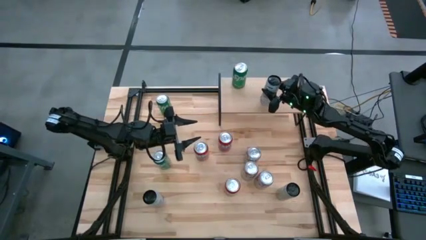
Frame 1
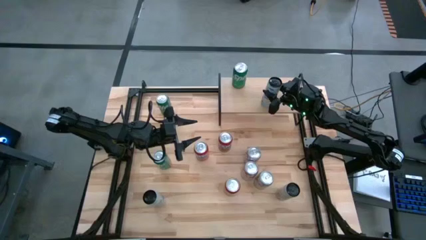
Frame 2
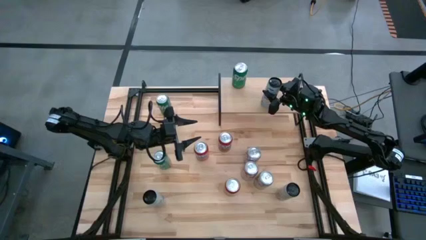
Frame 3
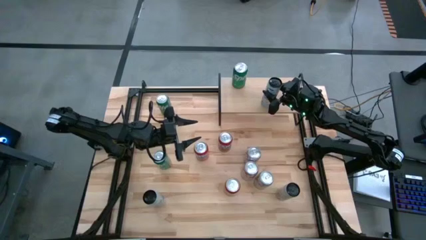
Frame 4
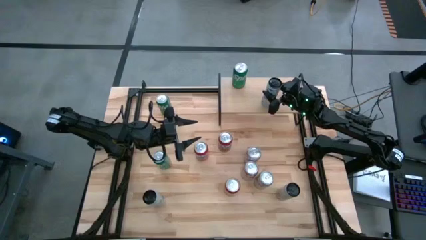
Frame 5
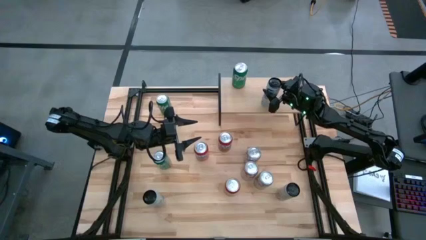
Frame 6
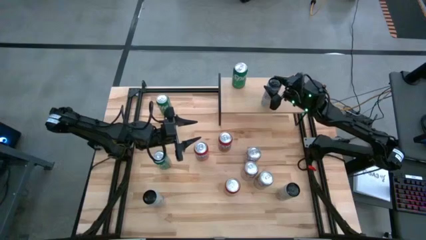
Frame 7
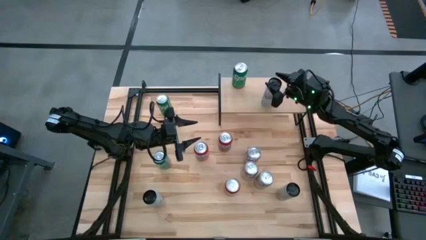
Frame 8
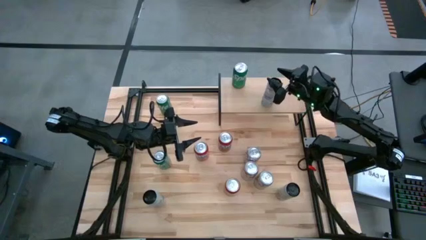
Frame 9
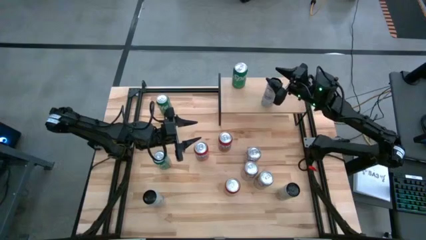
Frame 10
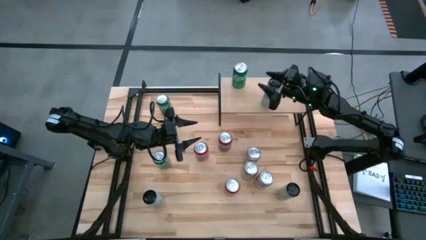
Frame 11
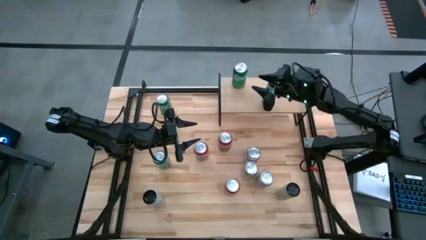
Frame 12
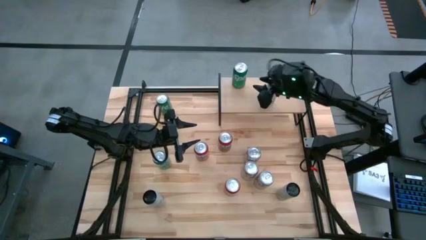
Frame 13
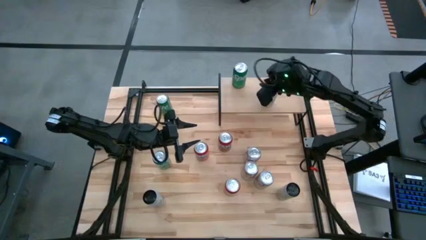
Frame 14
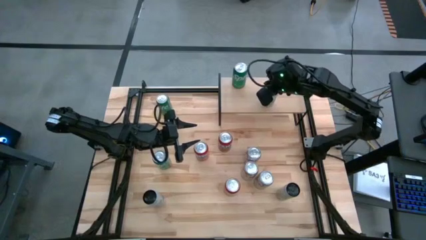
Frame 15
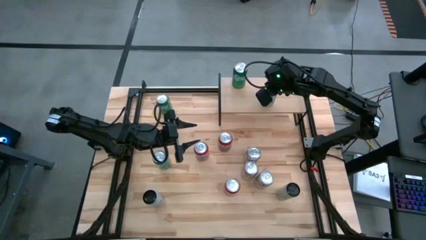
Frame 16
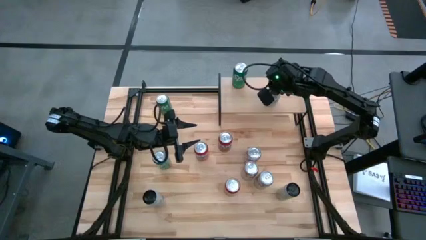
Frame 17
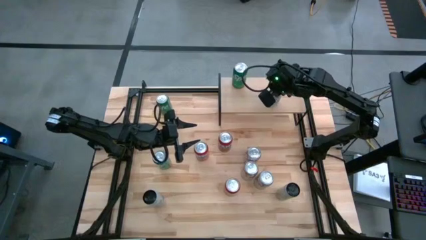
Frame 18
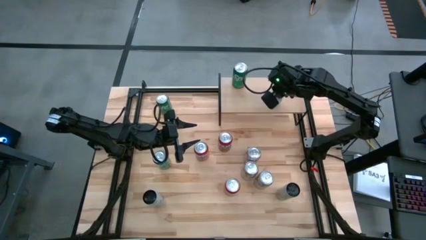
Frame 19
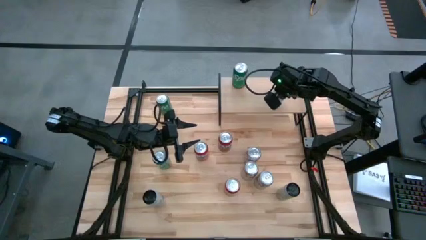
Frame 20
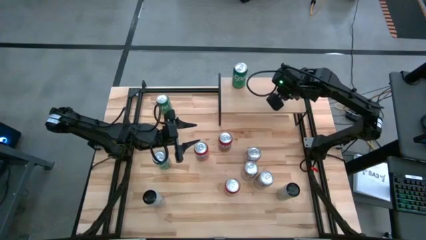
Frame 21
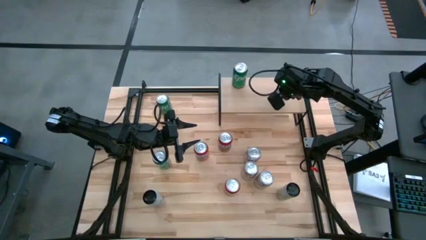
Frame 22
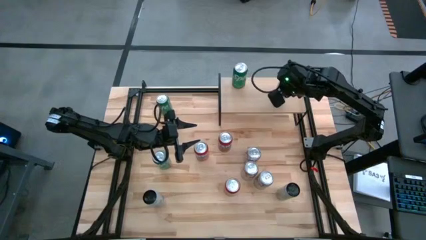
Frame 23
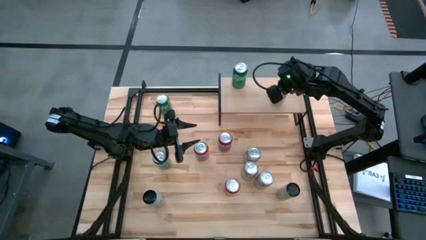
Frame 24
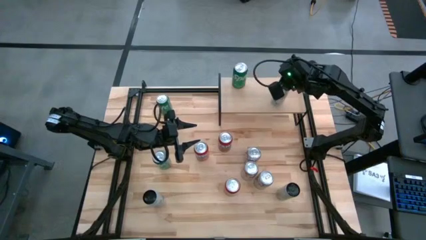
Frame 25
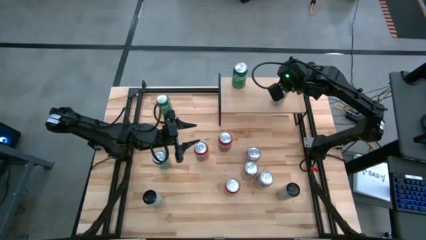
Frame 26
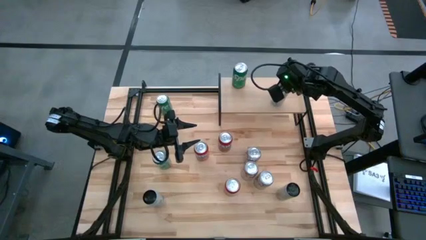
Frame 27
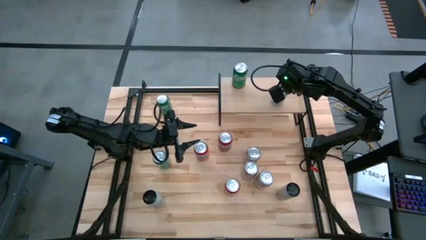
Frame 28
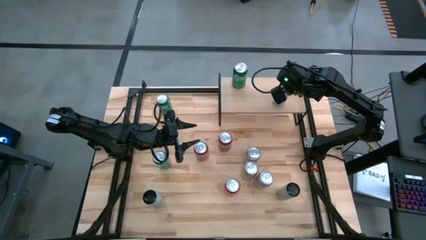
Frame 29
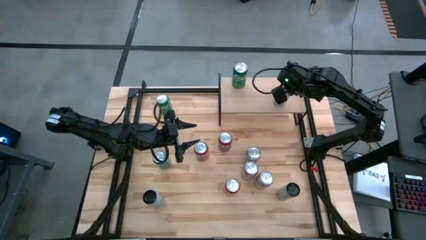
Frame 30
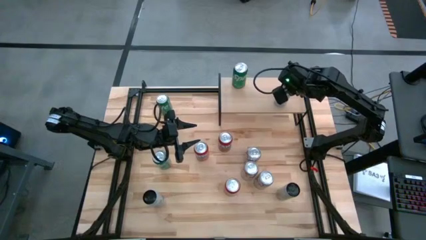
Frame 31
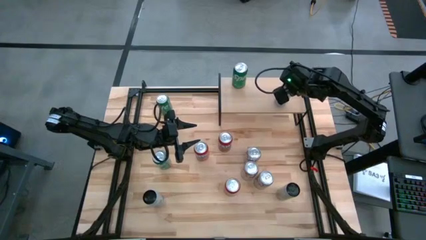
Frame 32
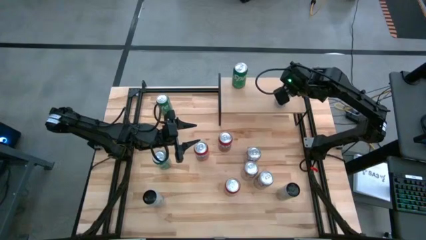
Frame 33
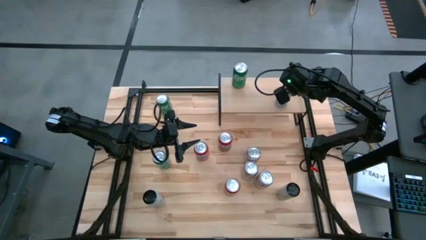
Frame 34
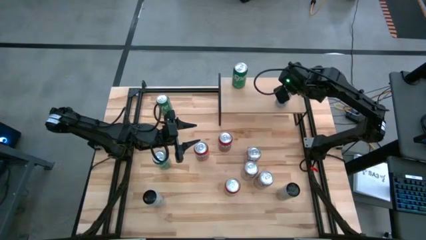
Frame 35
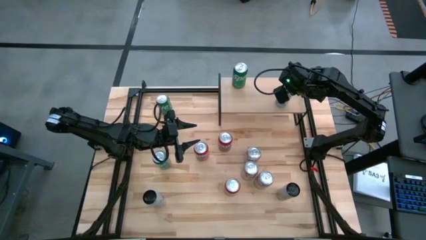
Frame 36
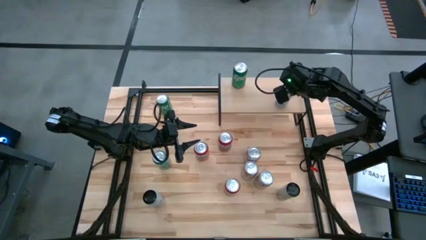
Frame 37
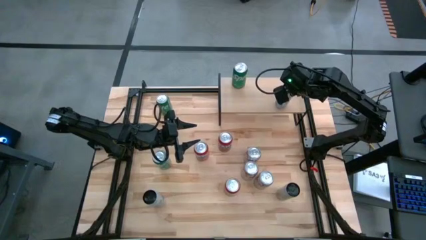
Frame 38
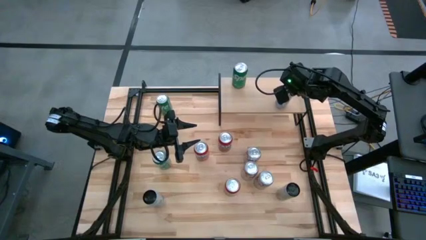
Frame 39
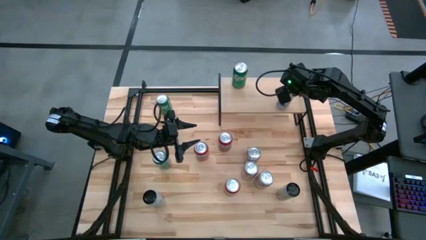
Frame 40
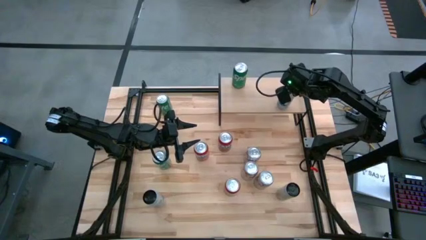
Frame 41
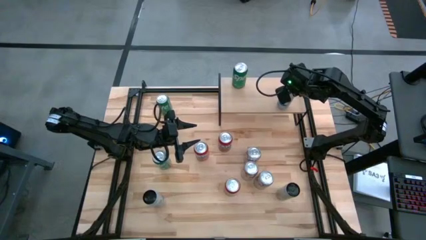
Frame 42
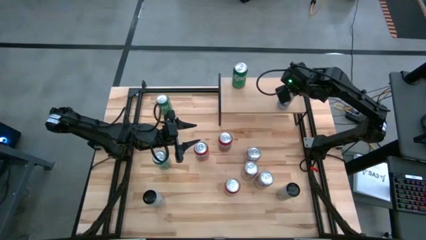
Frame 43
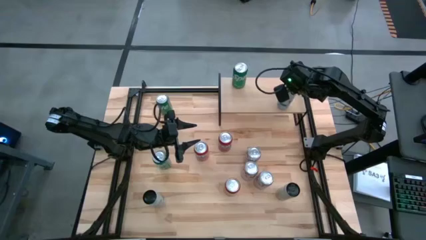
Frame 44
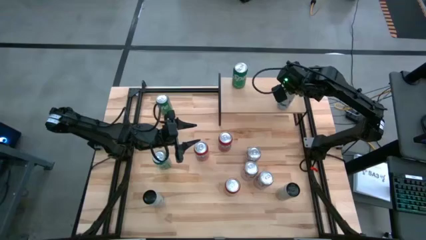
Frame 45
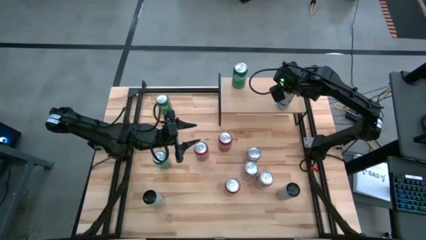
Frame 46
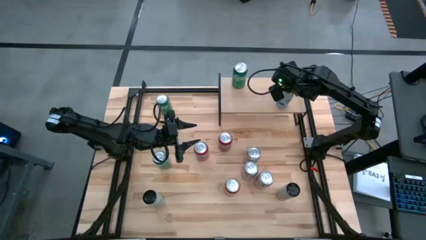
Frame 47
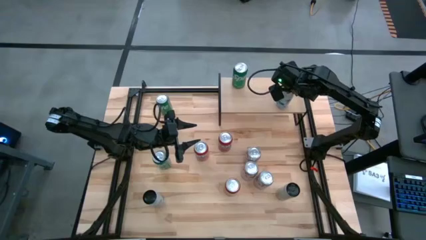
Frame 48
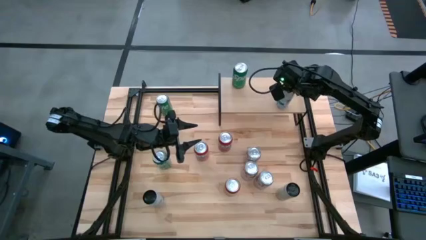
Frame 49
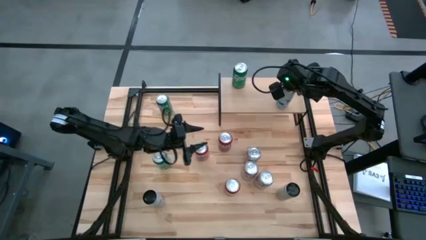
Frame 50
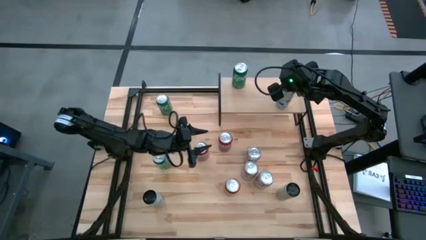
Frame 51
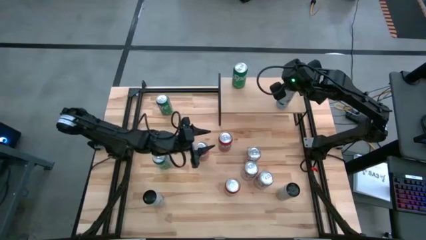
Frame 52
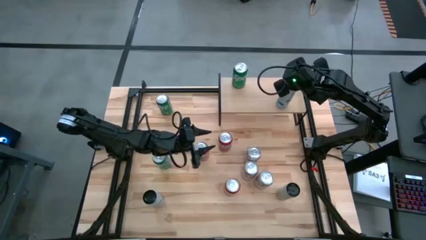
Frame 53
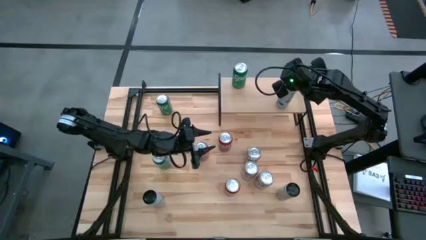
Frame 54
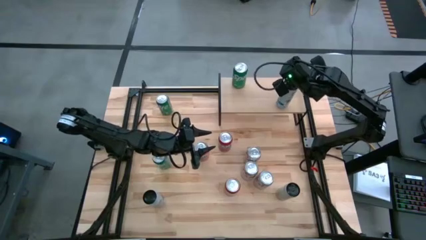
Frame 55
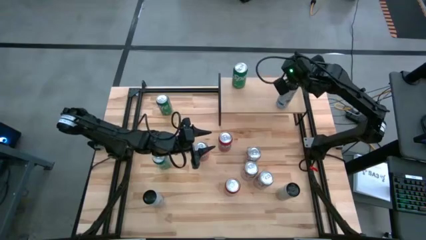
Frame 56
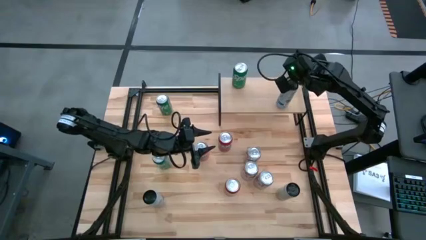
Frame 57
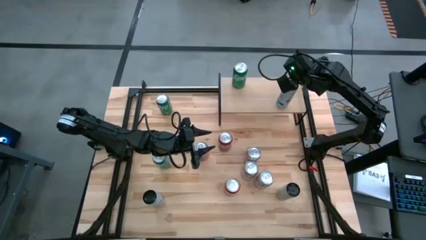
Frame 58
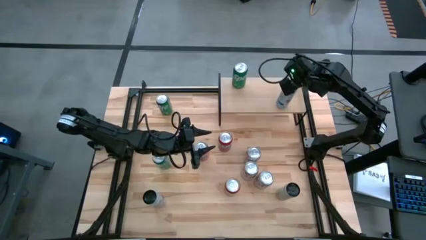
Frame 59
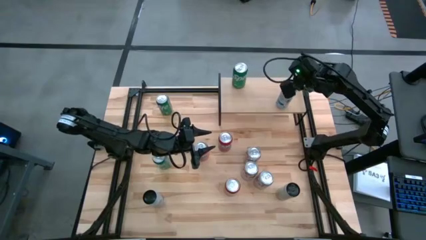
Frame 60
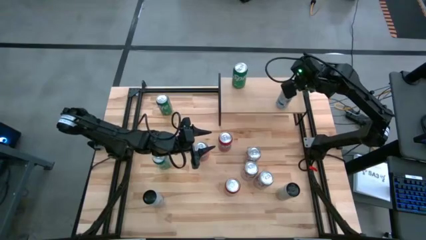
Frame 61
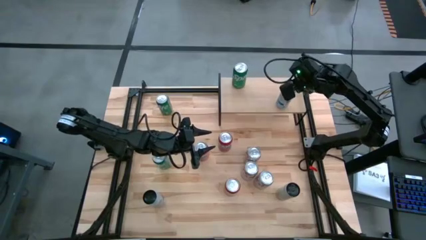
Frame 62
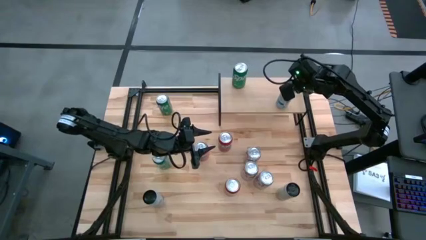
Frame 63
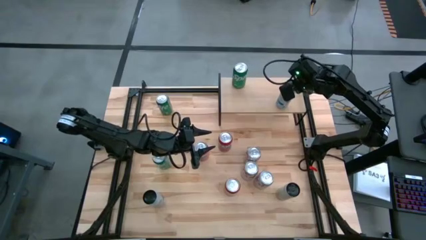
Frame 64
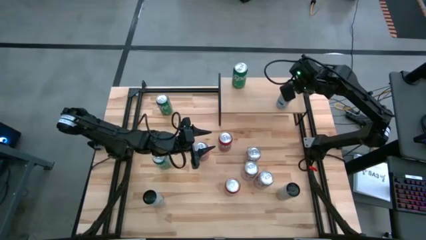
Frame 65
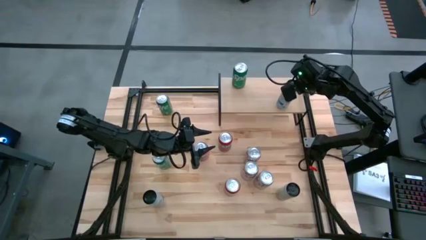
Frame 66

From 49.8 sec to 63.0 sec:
Task: Place canned beverage on shelf
Put the center white soda can on the shelf
